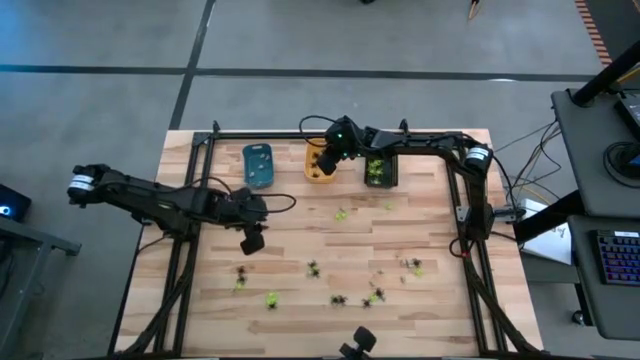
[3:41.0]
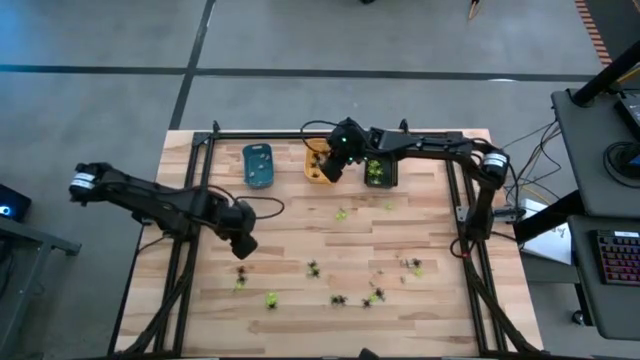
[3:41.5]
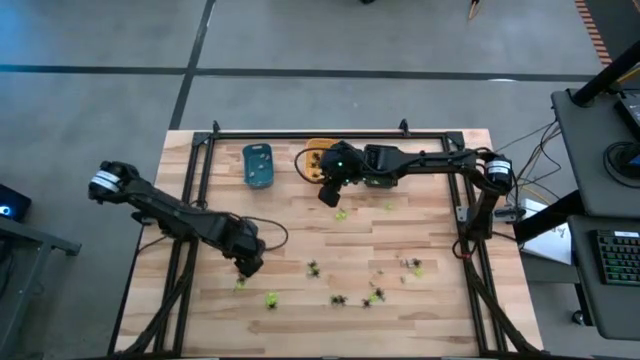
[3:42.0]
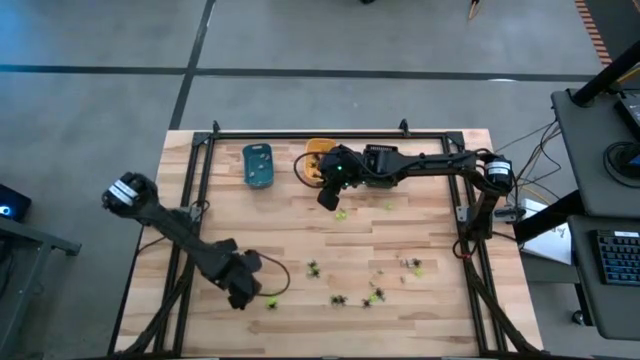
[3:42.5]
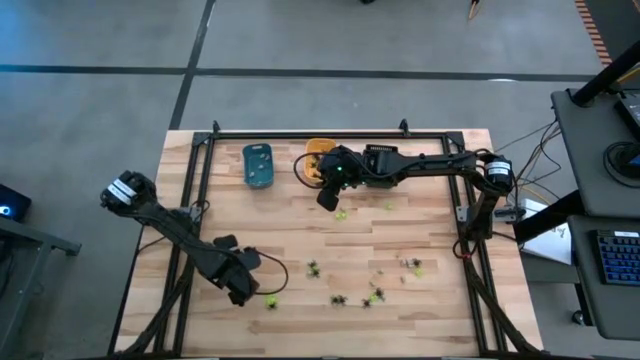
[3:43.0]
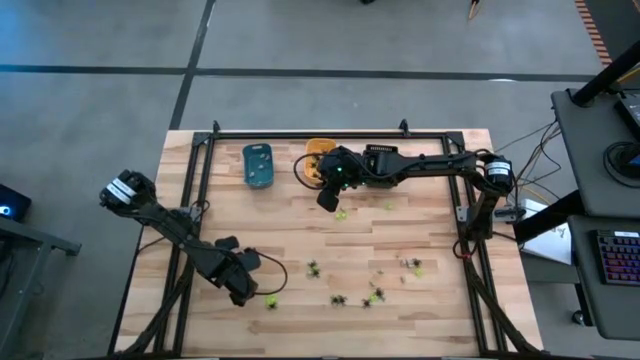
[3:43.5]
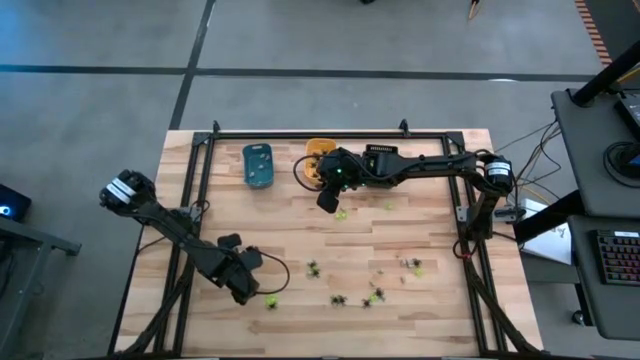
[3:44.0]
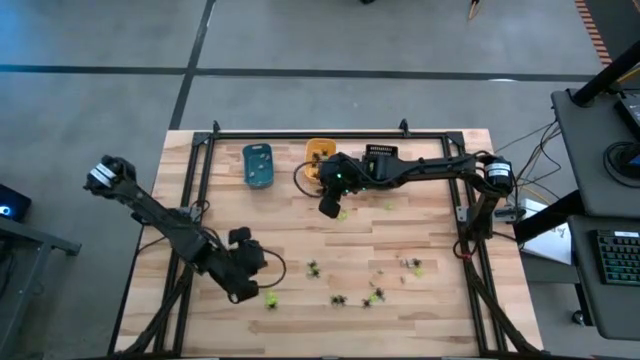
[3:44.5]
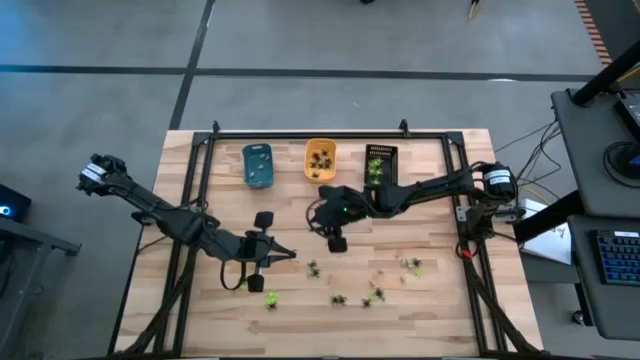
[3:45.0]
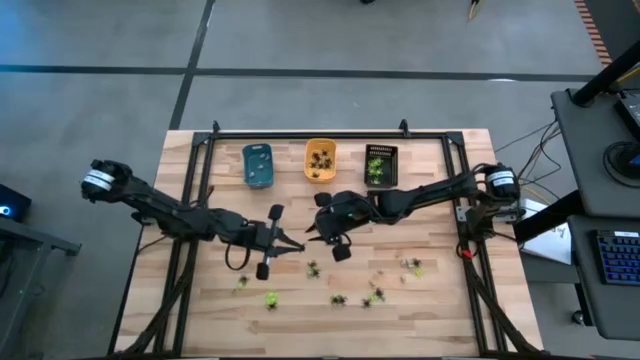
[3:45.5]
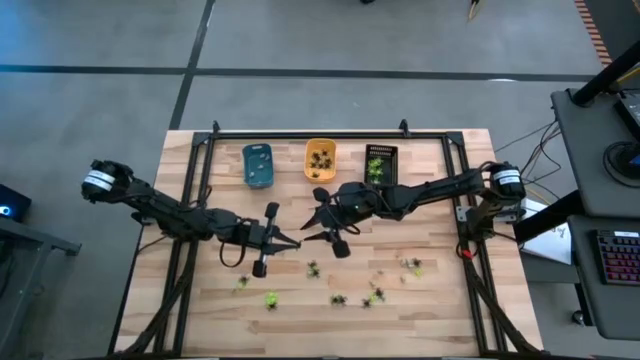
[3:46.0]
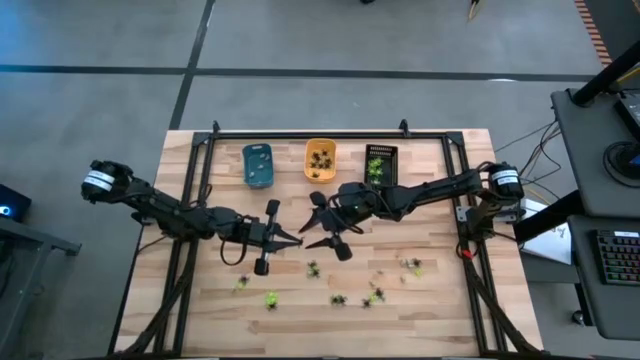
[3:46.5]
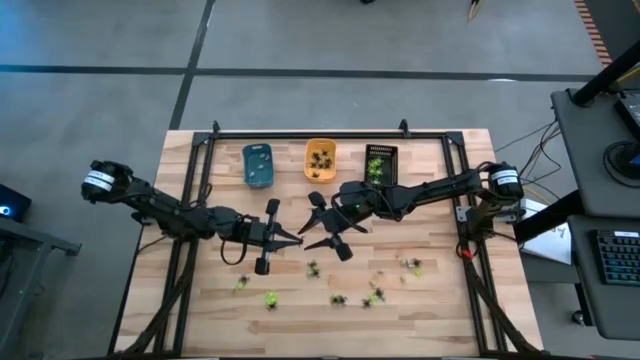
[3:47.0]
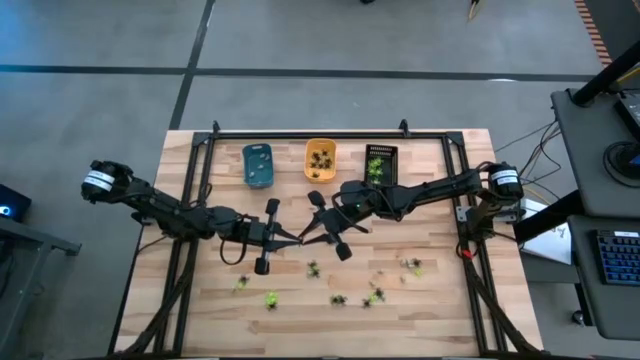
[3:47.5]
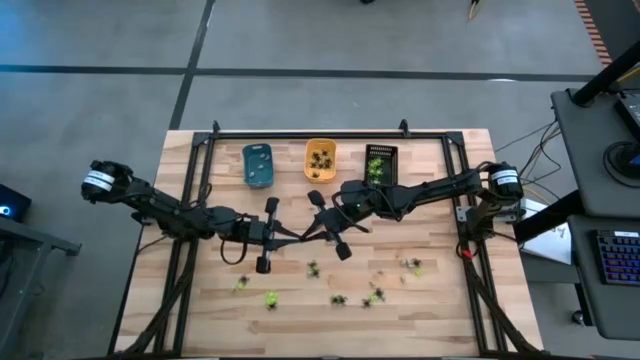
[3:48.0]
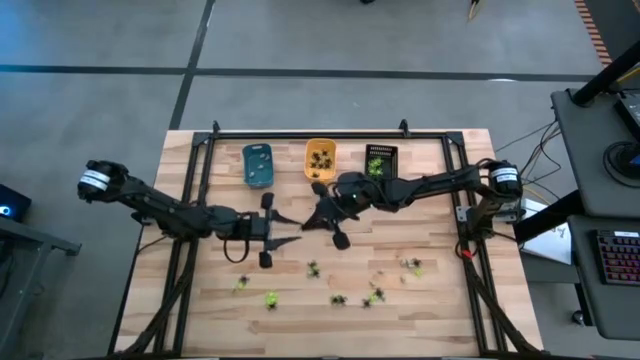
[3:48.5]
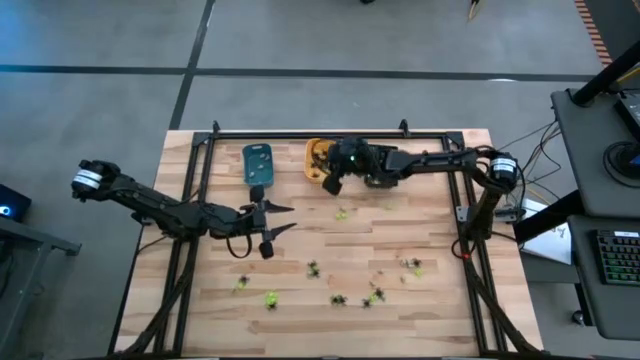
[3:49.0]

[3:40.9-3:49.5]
Task: Sort Halloween decoration
Put the black spider toy into the orange bin

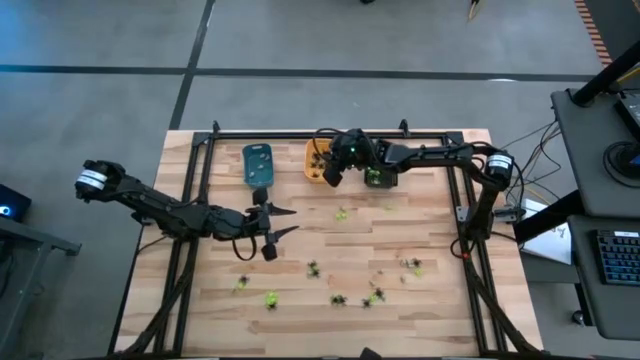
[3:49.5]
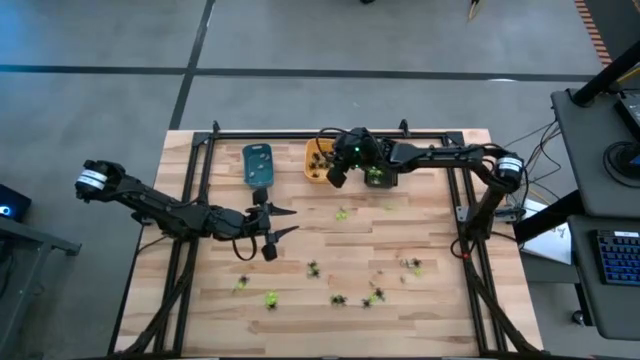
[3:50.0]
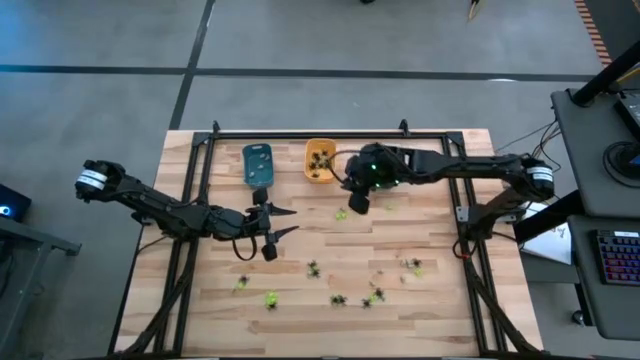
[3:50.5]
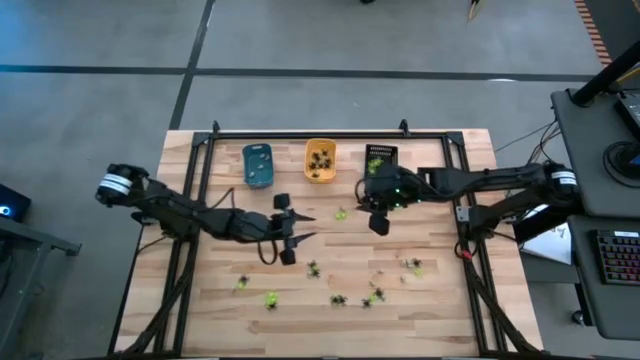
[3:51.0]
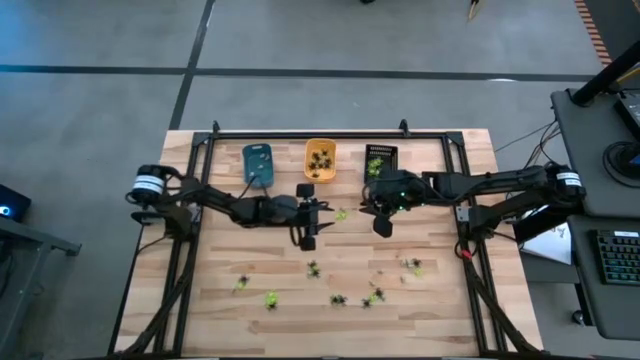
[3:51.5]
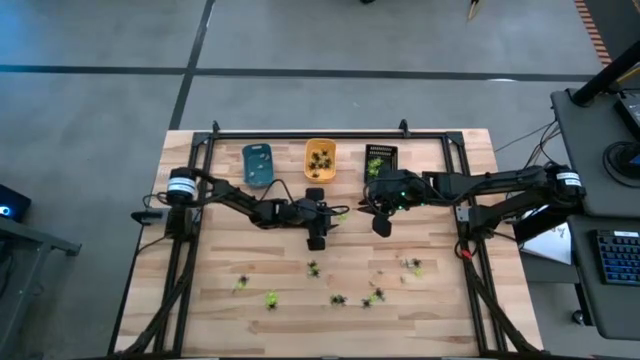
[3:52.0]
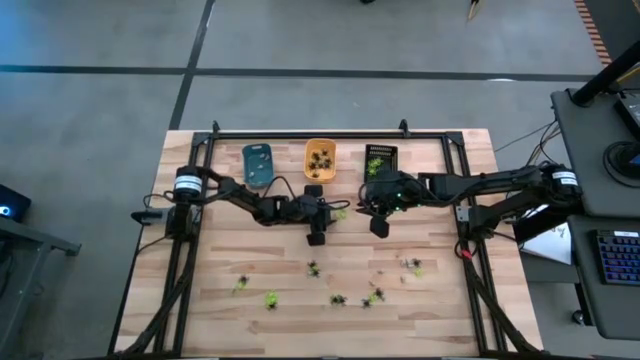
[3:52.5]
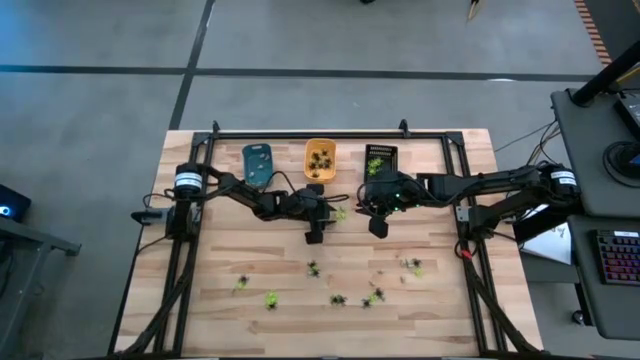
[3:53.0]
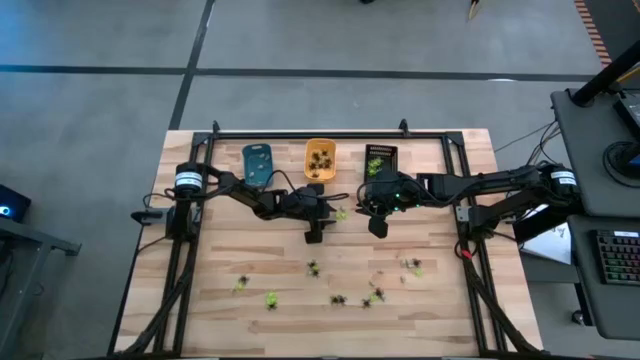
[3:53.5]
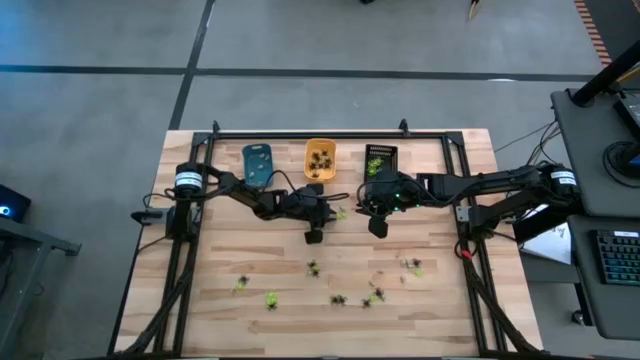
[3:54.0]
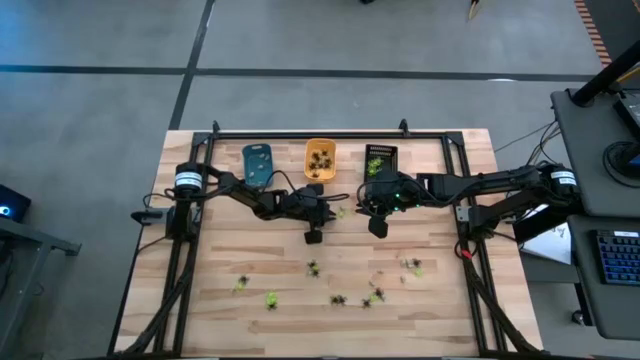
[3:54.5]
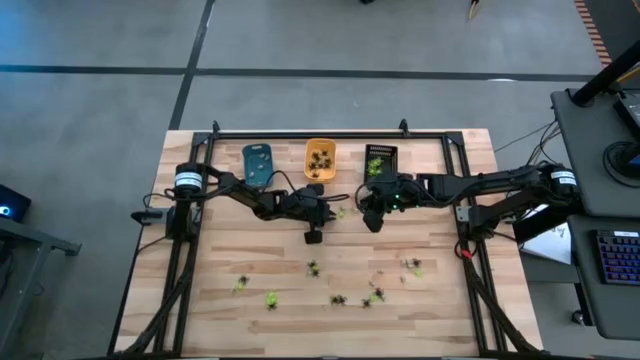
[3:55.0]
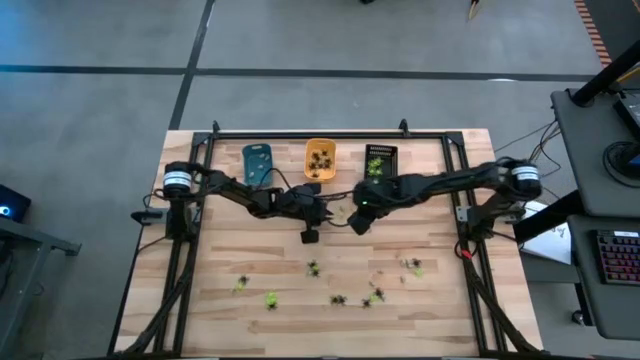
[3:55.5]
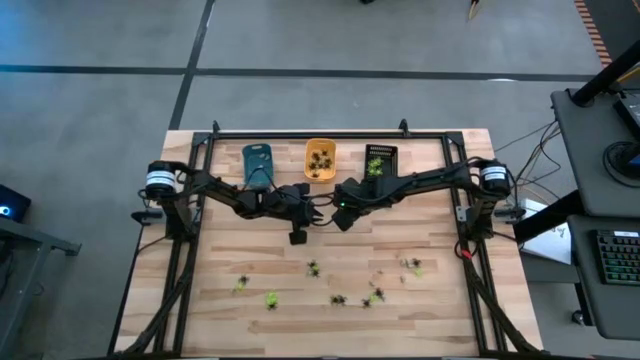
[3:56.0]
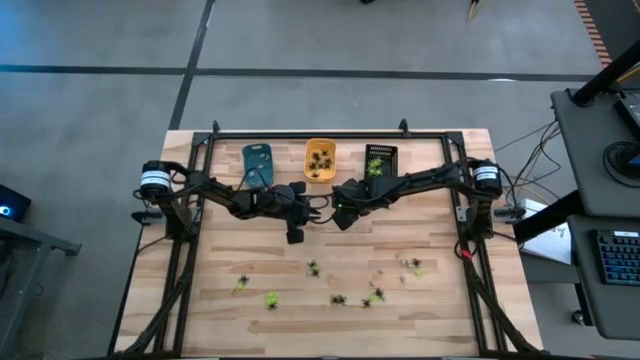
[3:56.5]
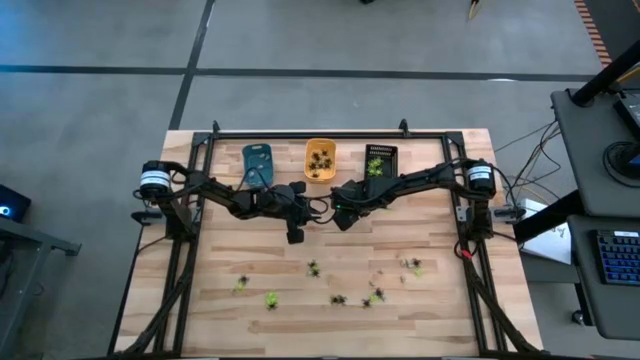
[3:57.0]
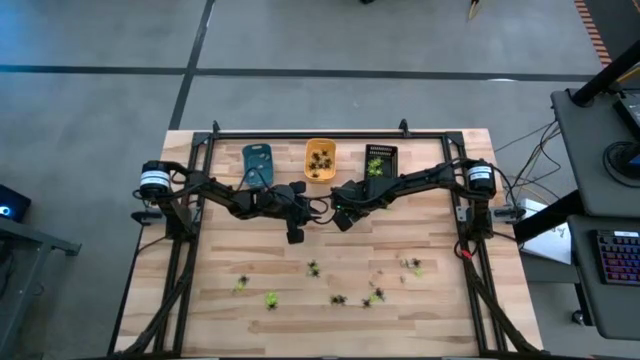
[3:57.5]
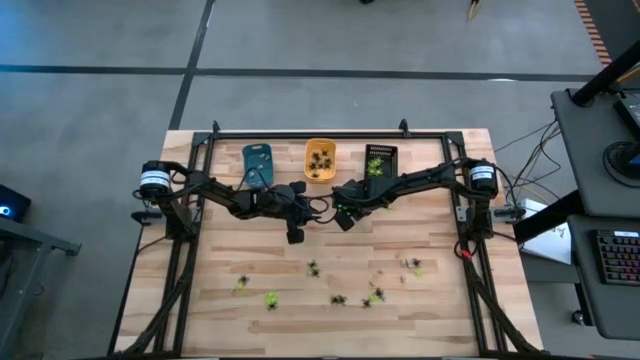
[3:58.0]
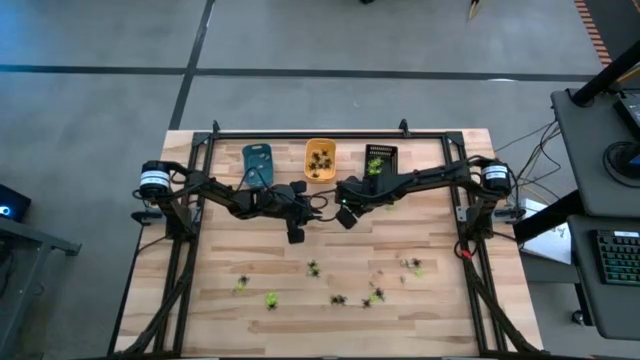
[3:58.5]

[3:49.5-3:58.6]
Put the green spider toy into the black bin
